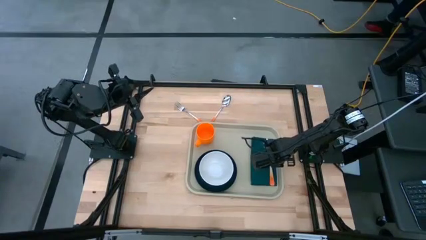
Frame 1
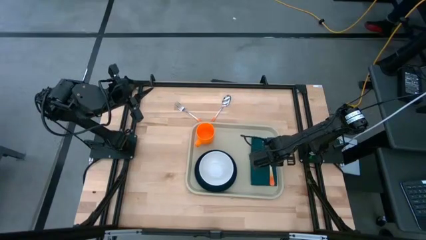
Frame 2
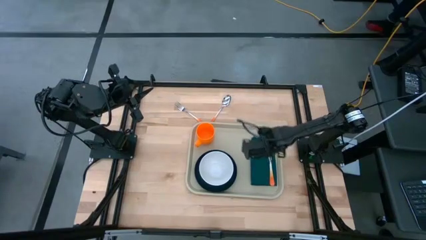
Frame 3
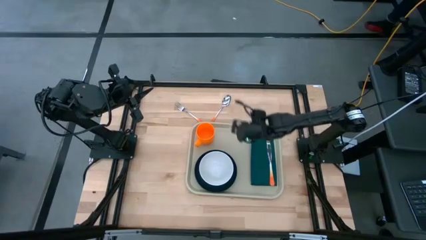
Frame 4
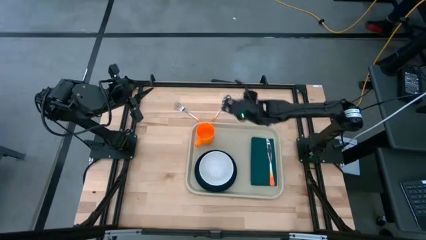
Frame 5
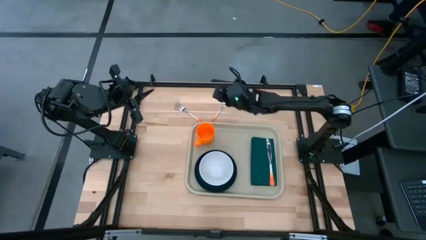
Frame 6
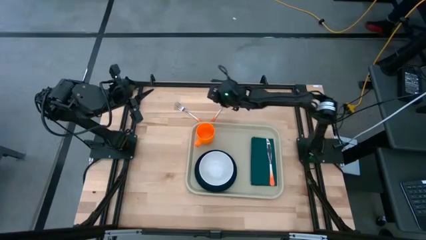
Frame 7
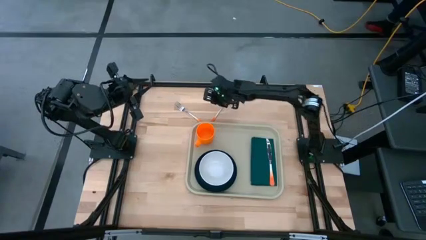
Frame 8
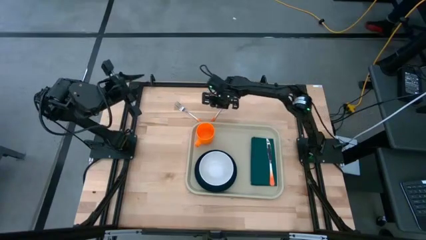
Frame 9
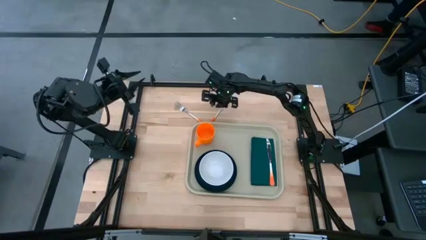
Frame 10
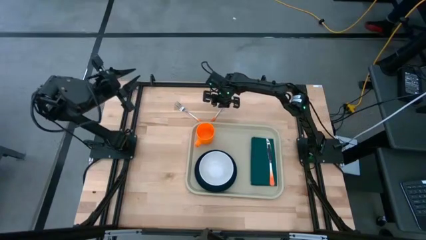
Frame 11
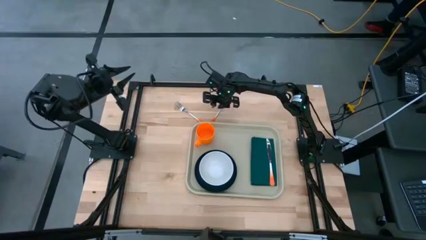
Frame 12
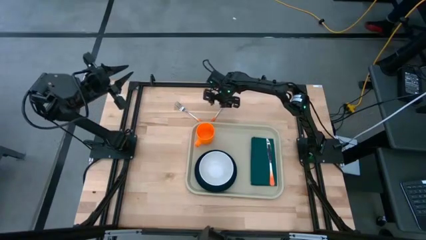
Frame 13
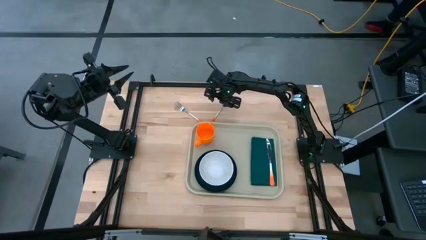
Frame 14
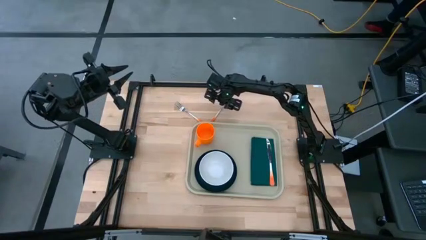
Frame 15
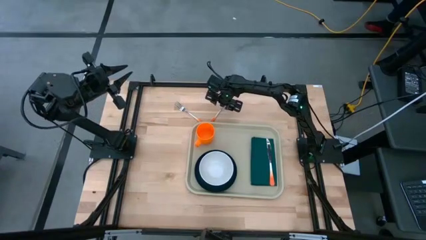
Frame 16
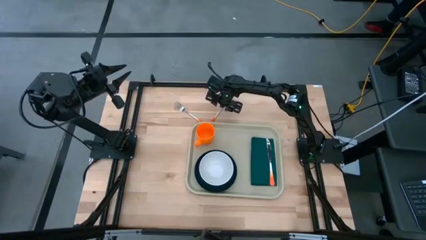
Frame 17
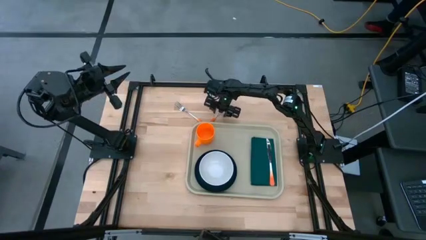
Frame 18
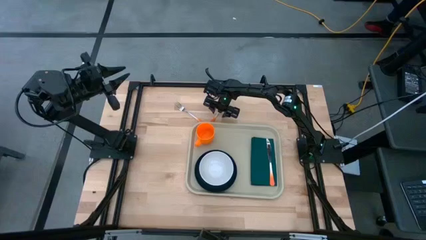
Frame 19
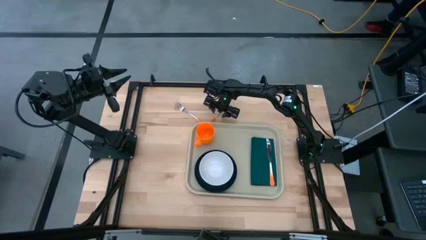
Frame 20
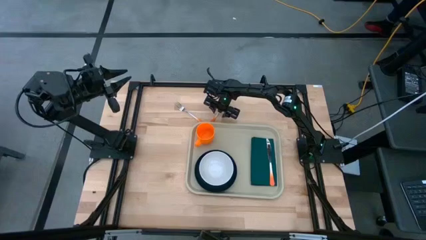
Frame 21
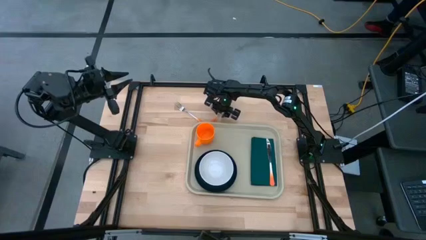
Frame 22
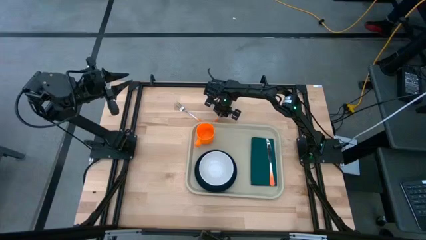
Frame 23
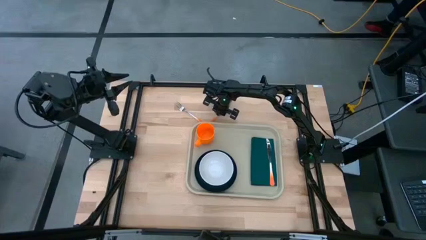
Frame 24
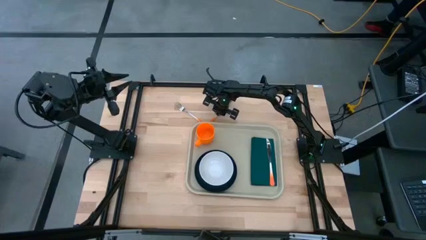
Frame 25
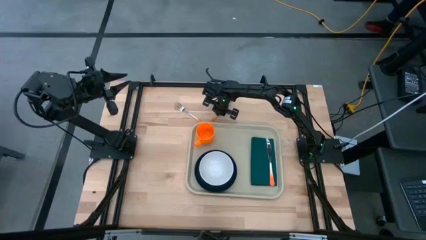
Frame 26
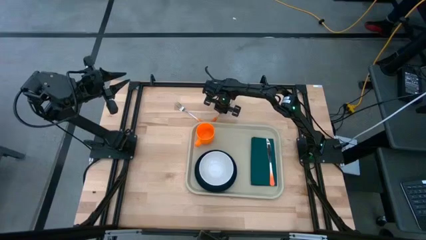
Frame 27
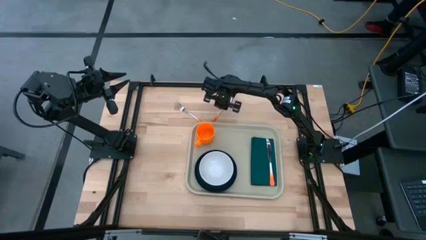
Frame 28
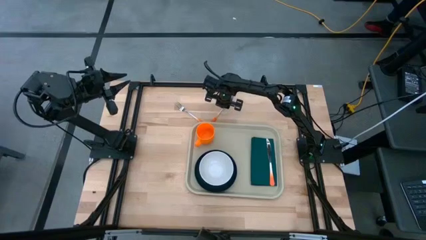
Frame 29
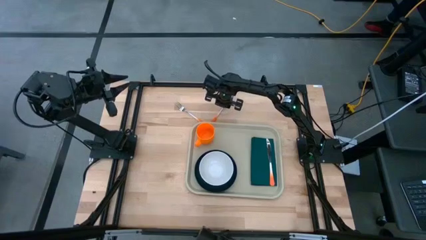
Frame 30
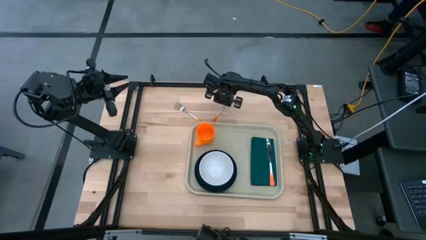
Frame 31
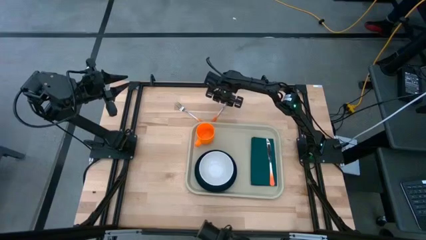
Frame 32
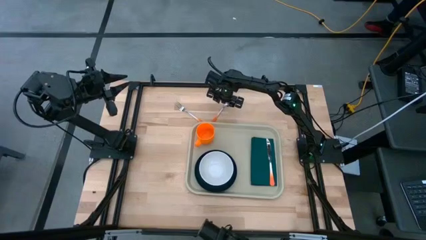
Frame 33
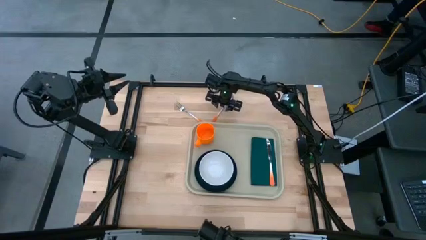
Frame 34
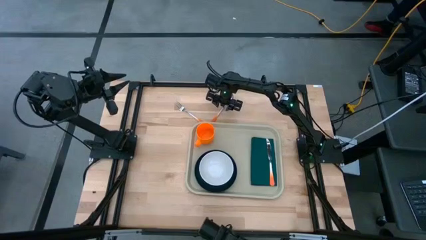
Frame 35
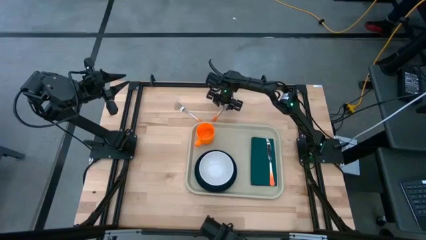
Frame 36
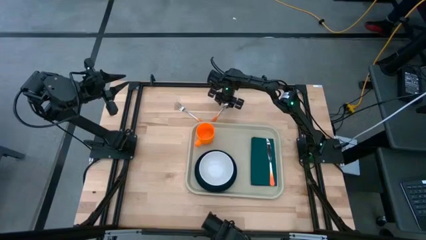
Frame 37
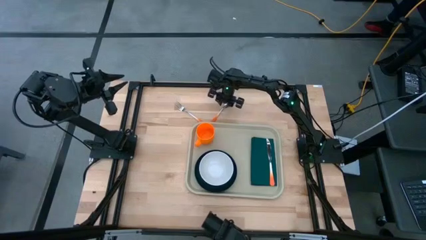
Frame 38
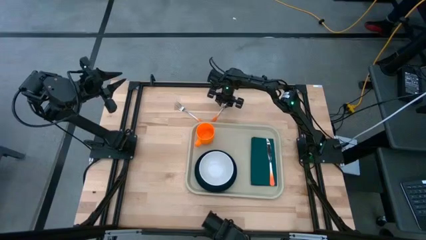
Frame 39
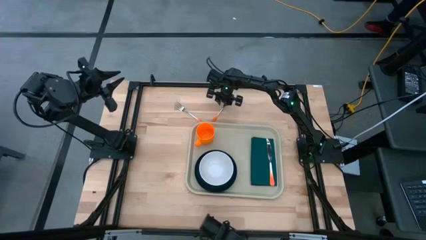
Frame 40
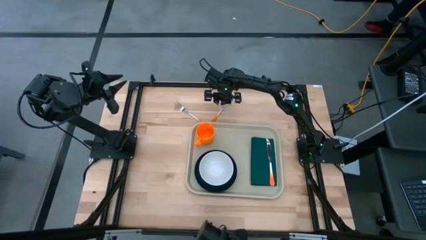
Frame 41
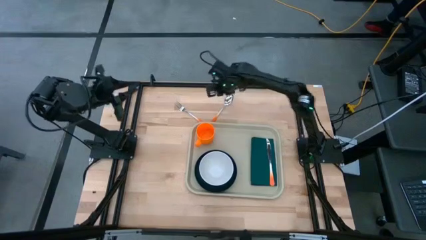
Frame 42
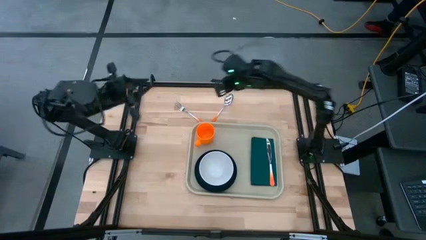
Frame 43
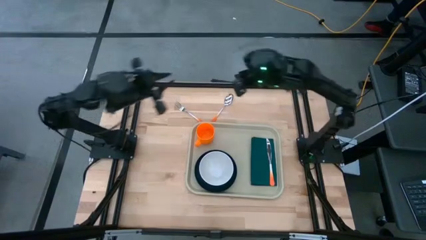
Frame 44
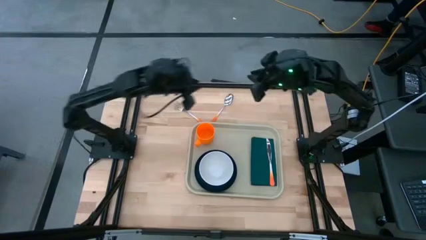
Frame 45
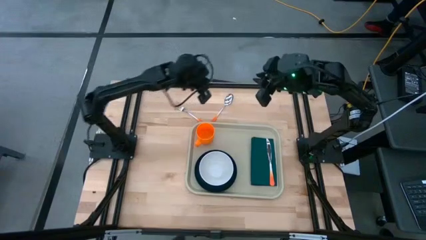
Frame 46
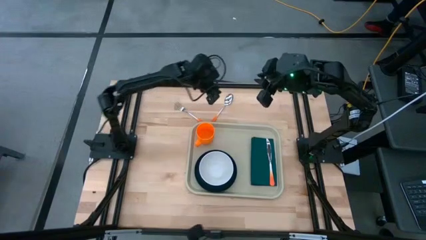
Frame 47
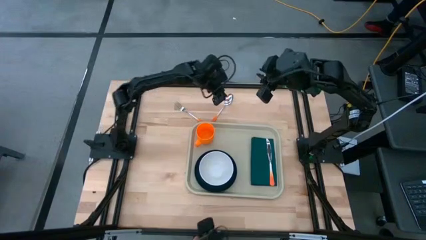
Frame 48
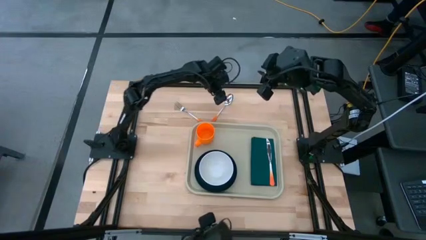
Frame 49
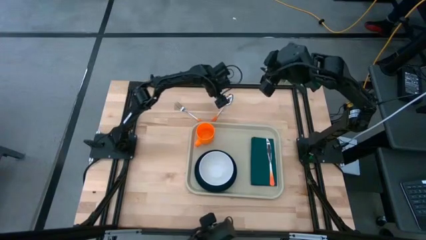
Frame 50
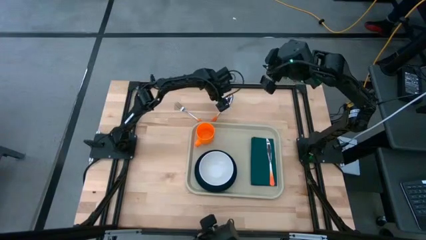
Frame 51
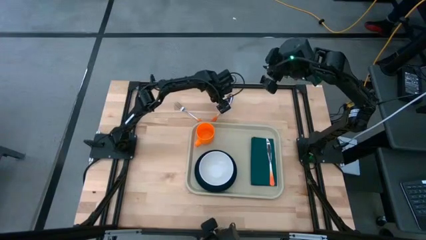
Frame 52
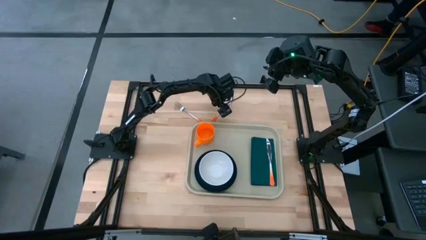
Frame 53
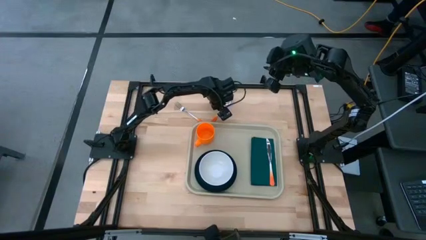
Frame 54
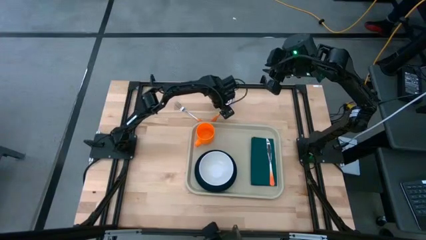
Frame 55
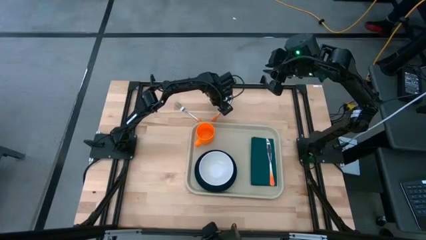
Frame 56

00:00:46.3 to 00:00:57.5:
Task: Set up tray
Put the orange spoon on the green napkin to the left of the orange knife

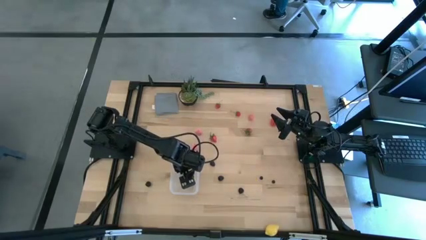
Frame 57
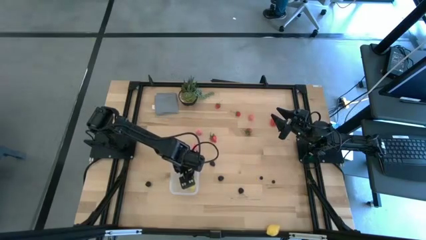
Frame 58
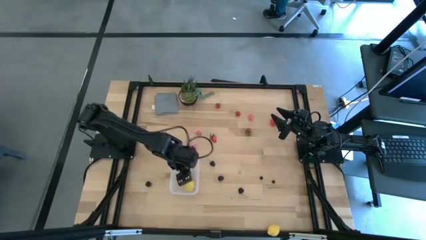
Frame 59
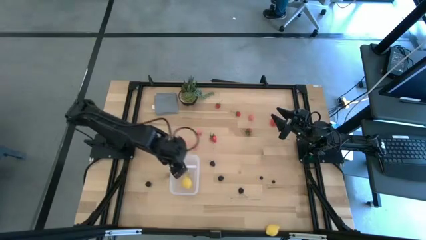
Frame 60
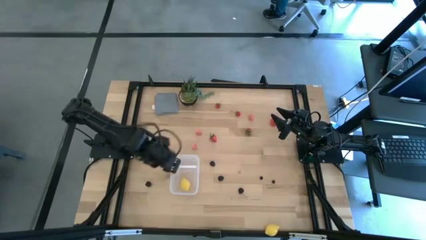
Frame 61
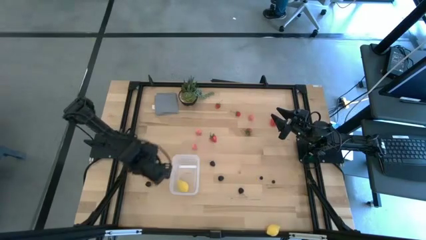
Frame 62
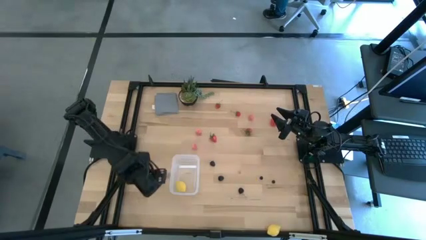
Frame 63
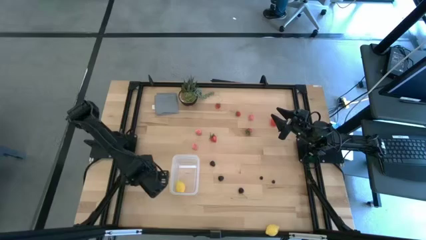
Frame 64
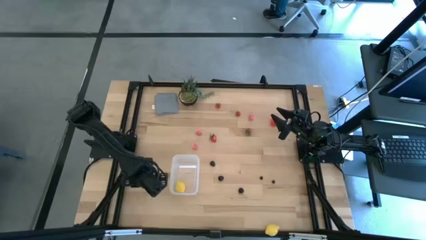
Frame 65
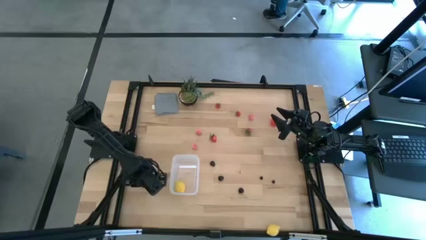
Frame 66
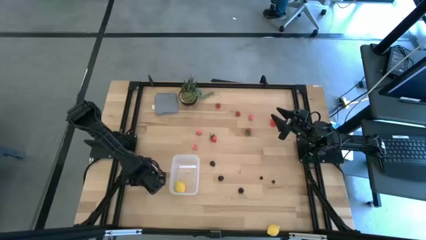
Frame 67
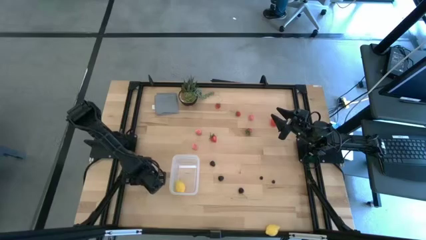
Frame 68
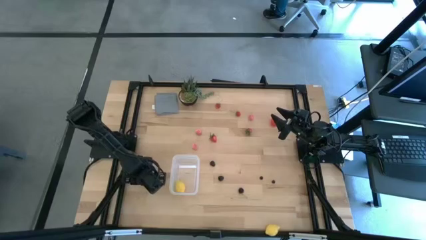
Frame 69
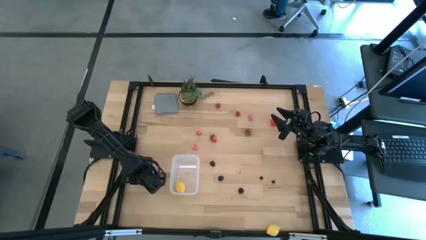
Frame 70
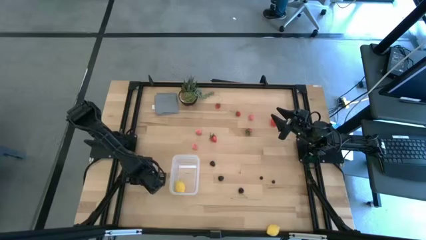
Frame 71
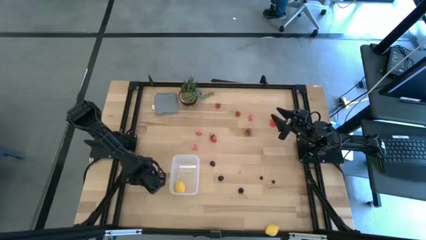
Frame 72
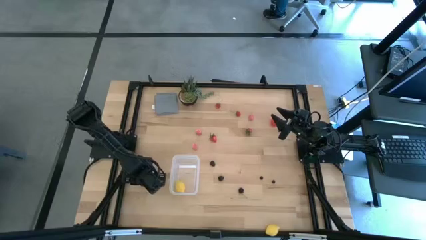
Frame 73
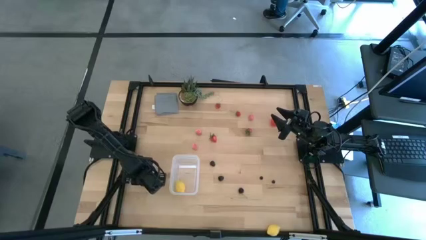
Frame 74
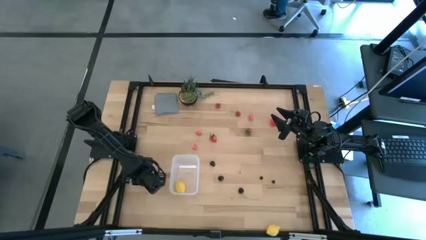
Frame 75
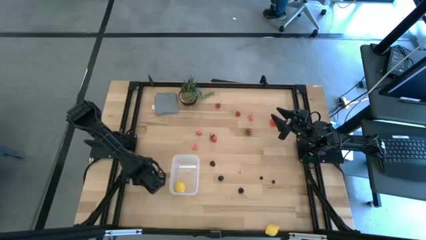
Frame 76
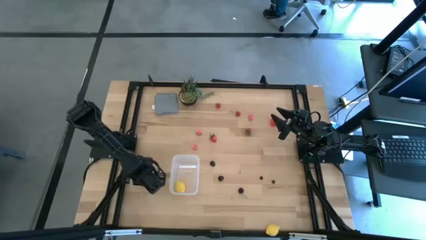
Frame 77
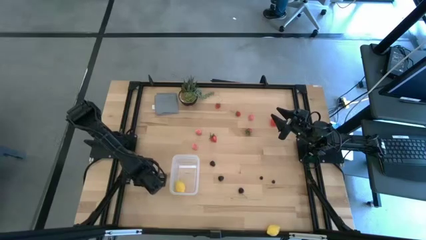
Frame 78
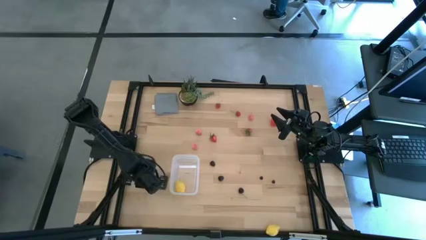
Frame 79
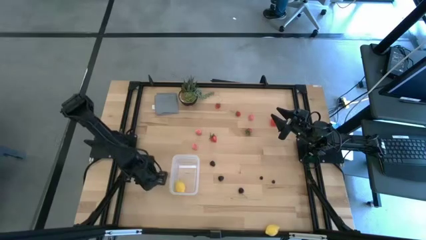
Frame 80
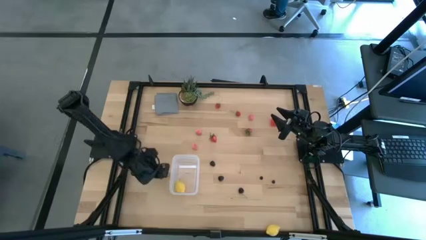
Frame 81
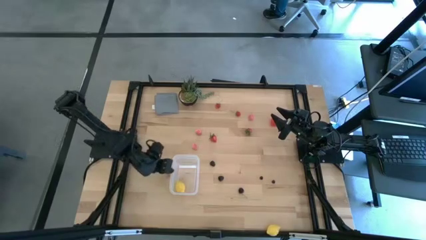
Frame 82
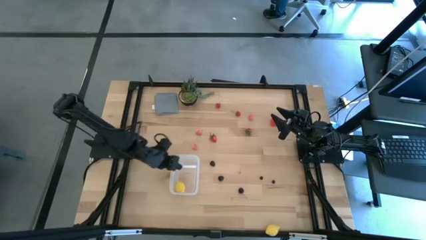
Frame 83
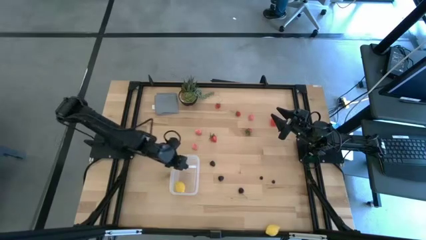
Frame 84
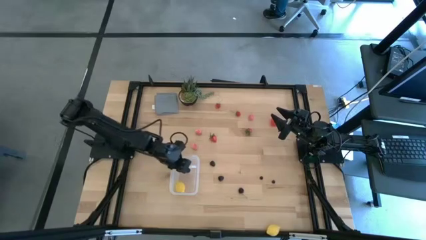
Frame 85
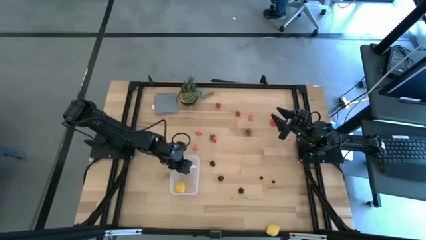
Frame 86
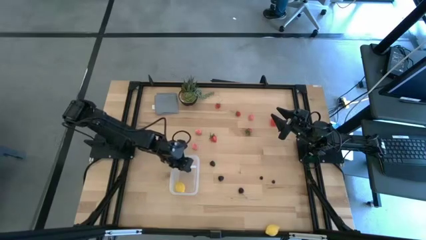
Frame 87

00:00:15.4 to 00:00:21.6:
Task: Pick and placing Produce into tupperware
Put the black cherry into the transparent bin
